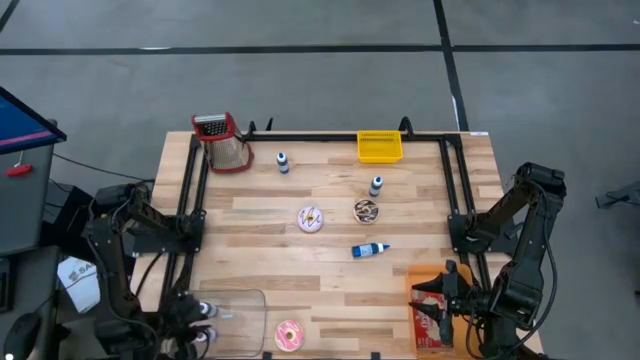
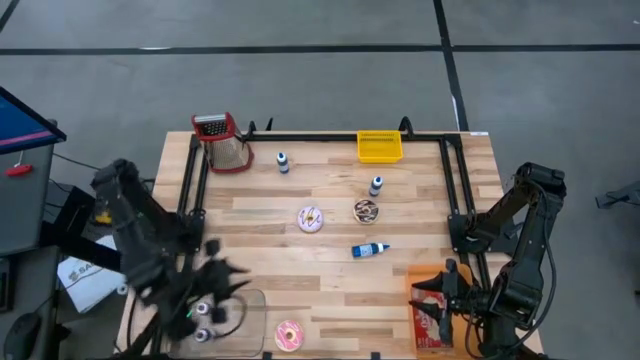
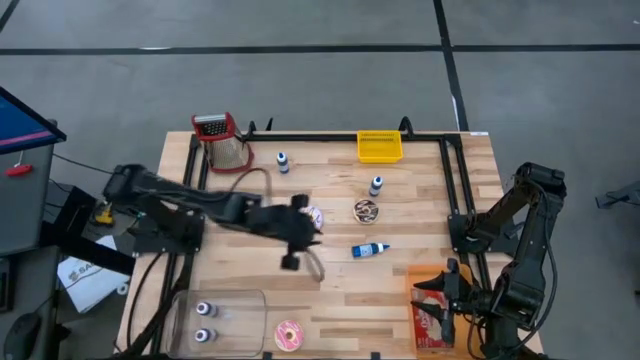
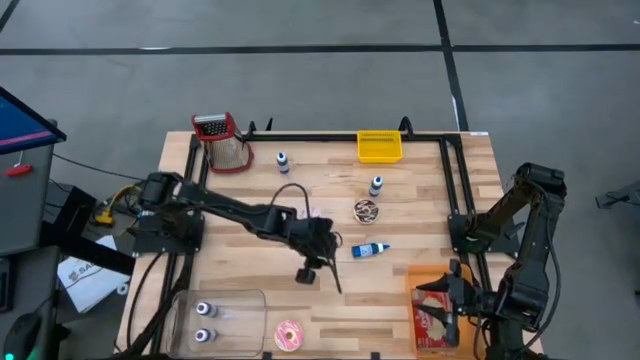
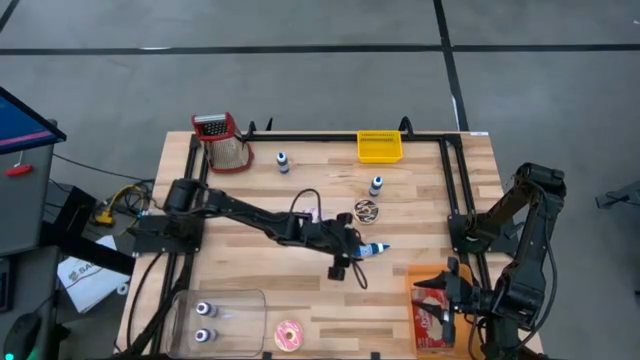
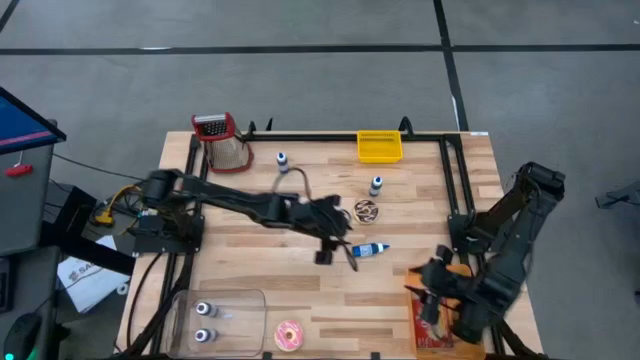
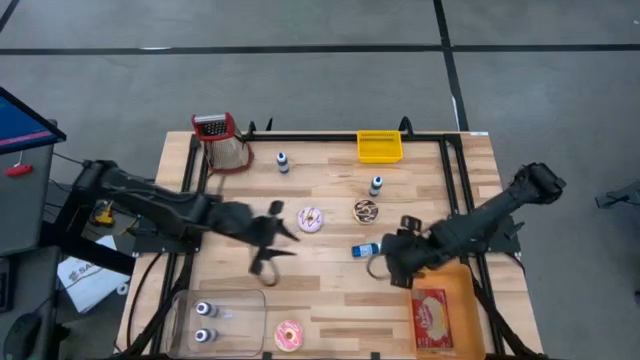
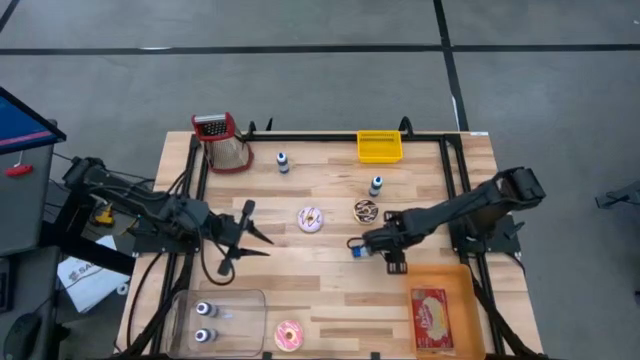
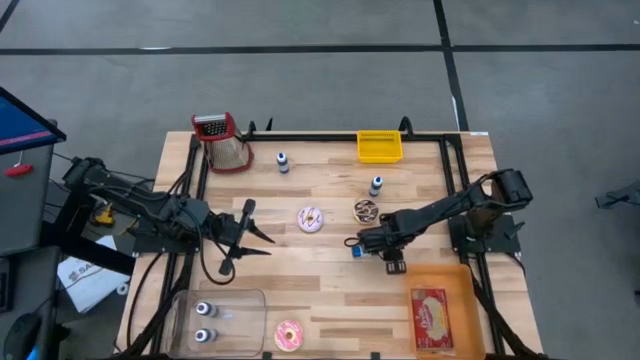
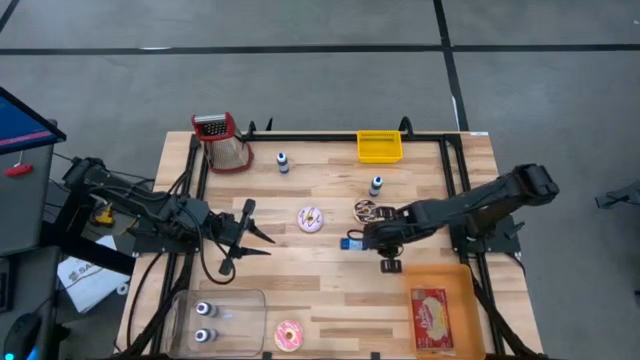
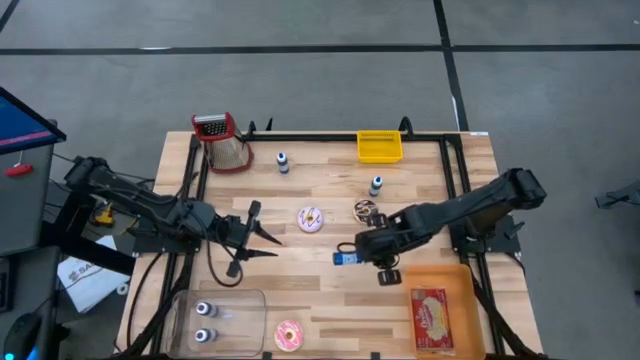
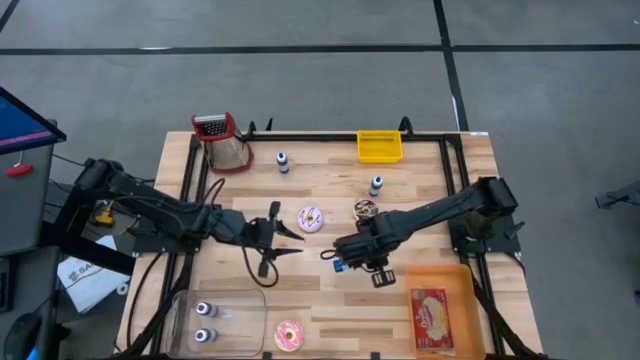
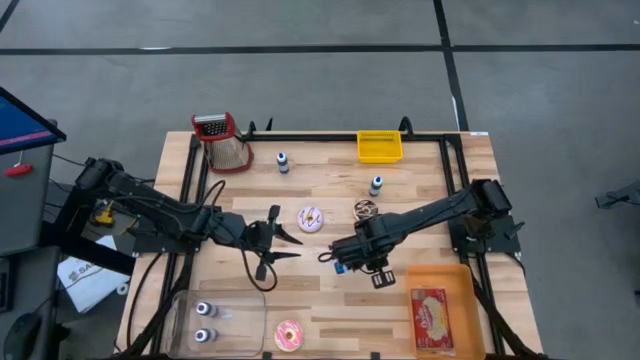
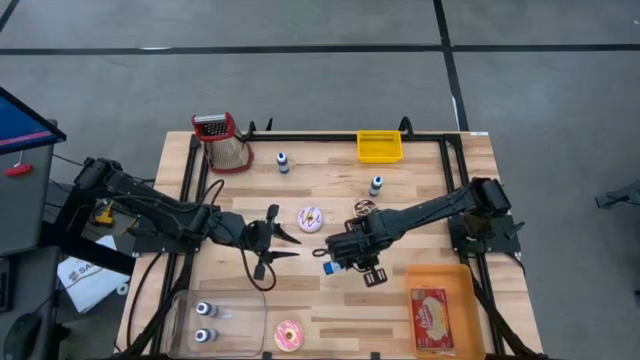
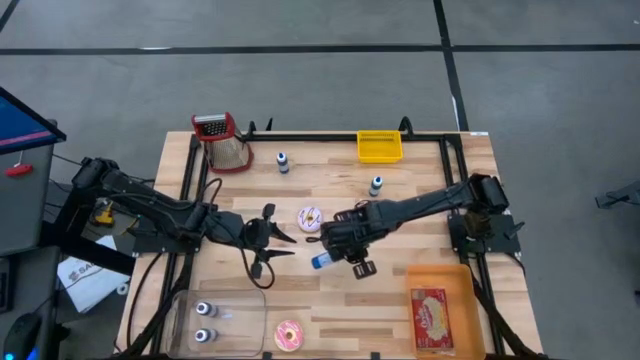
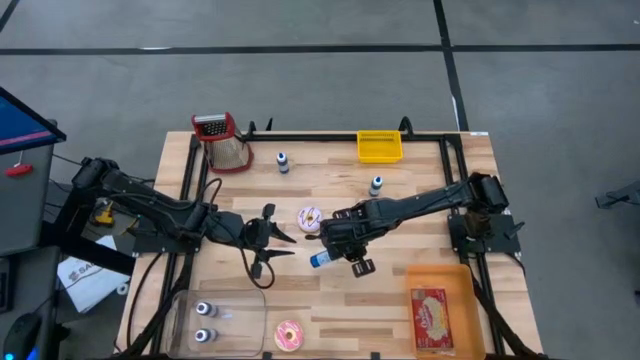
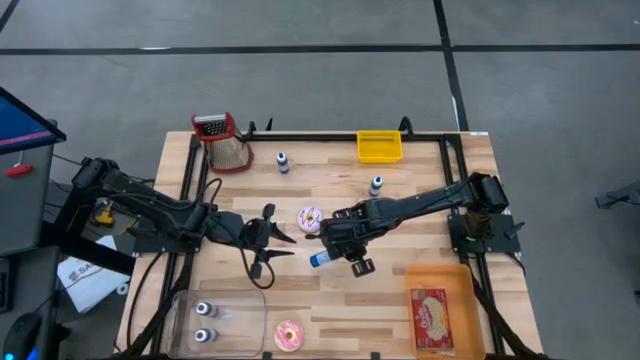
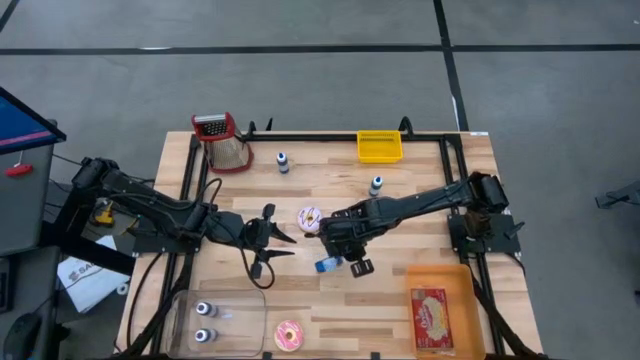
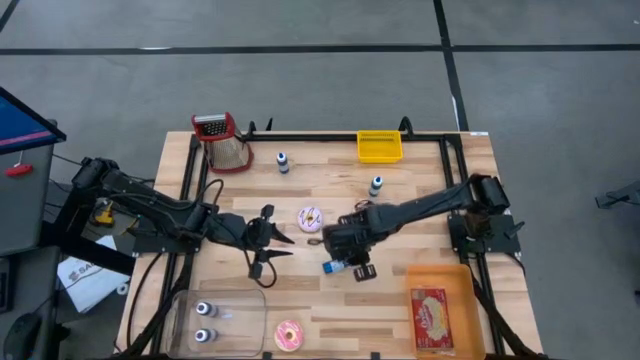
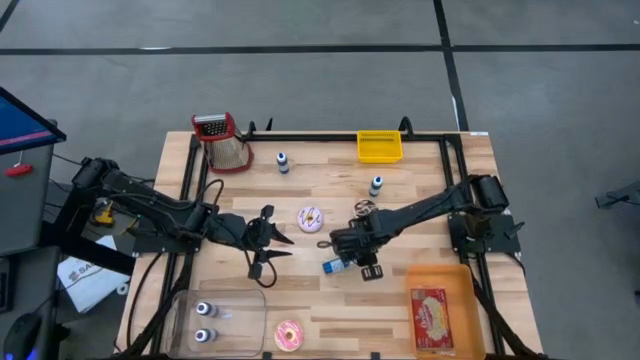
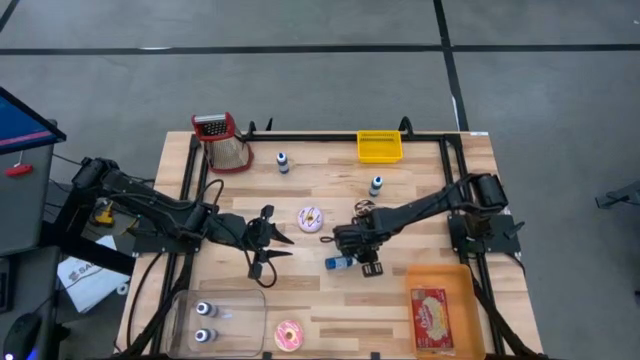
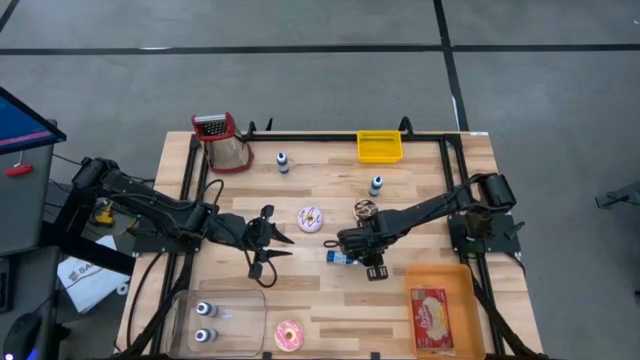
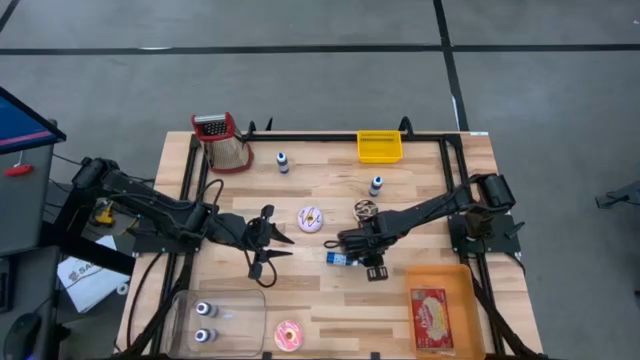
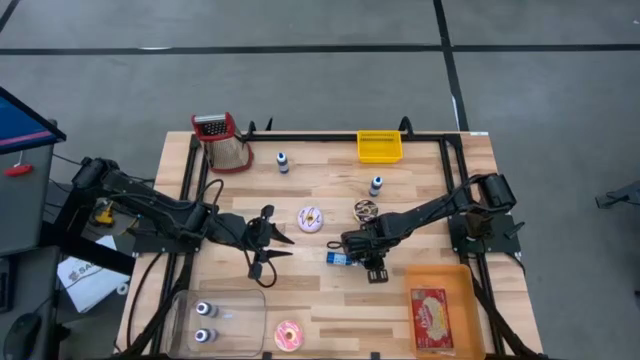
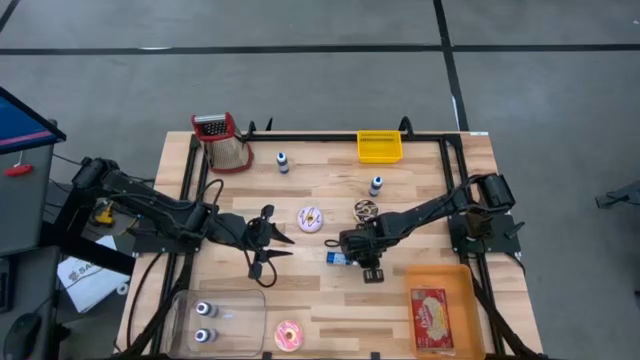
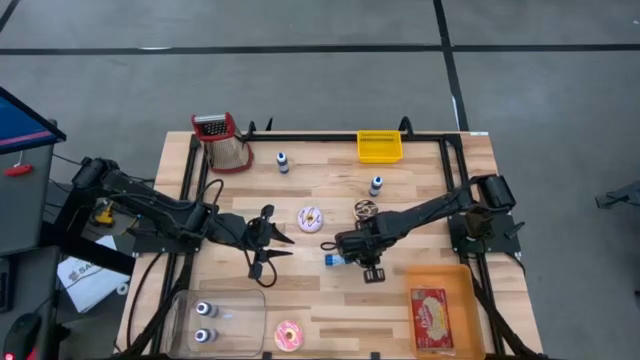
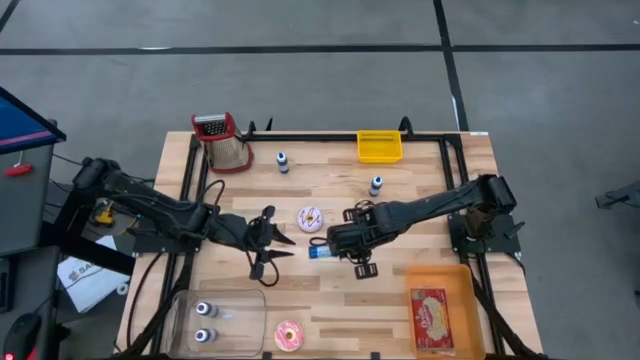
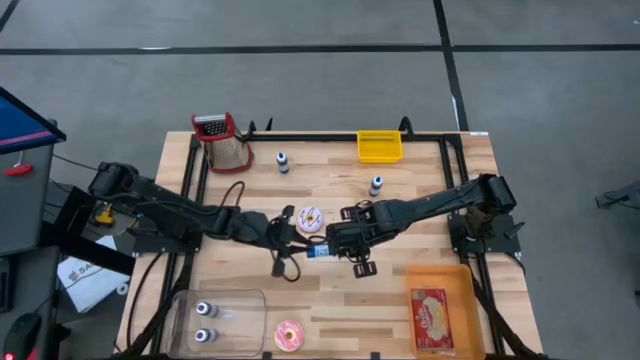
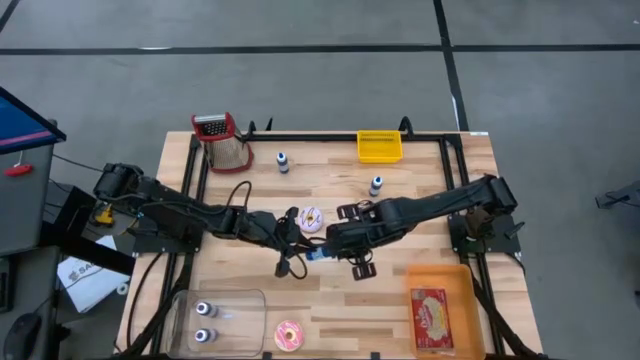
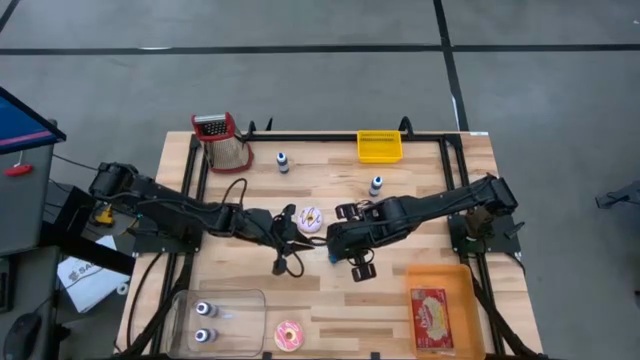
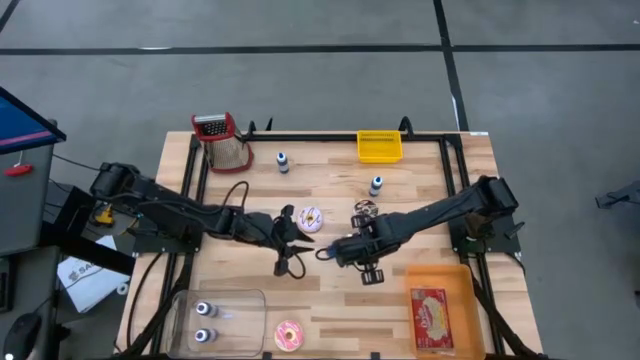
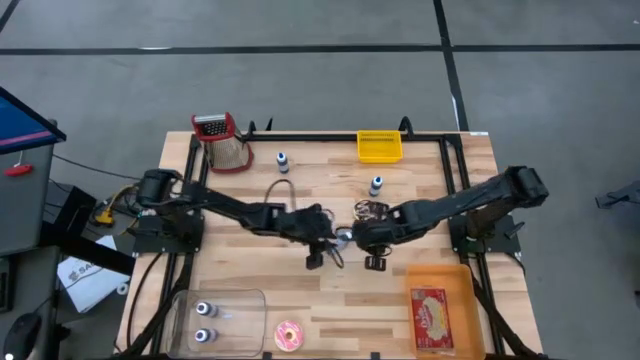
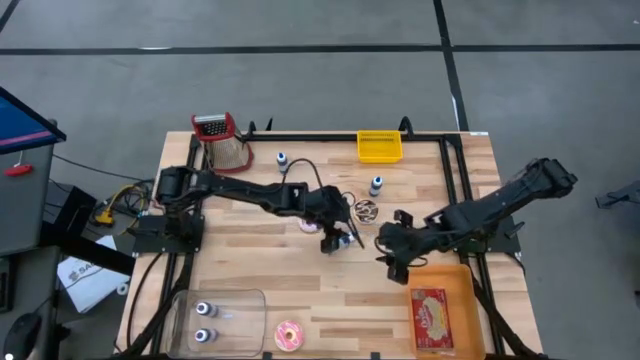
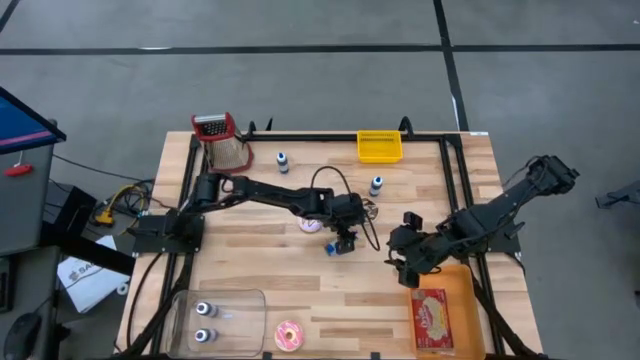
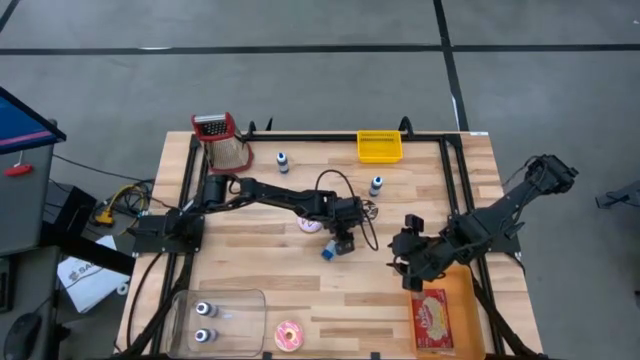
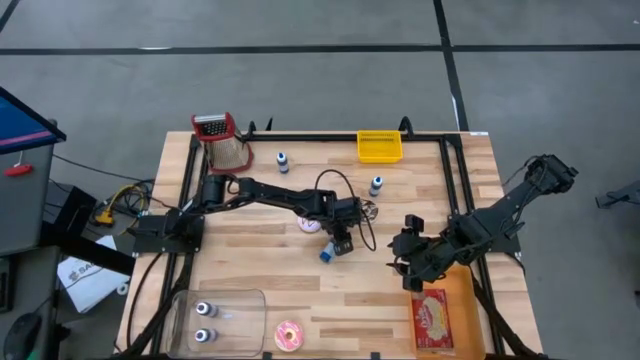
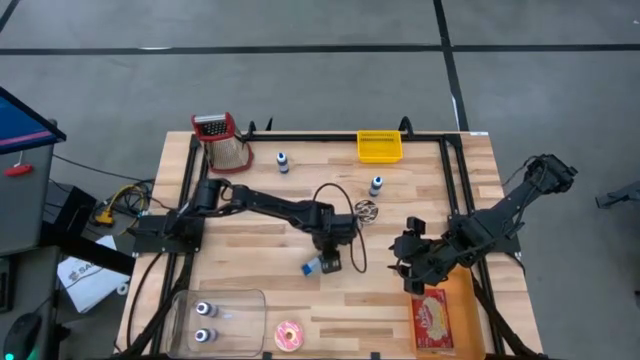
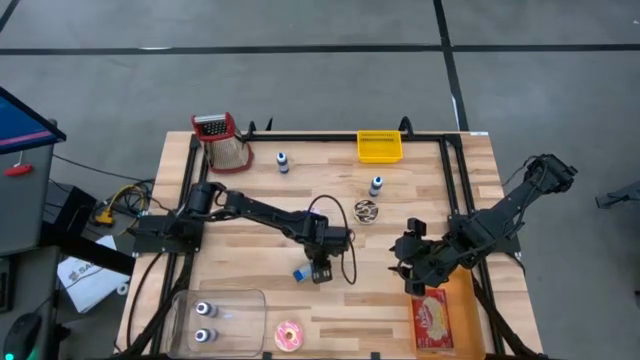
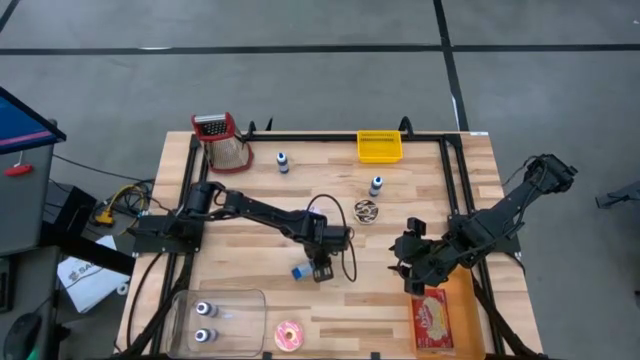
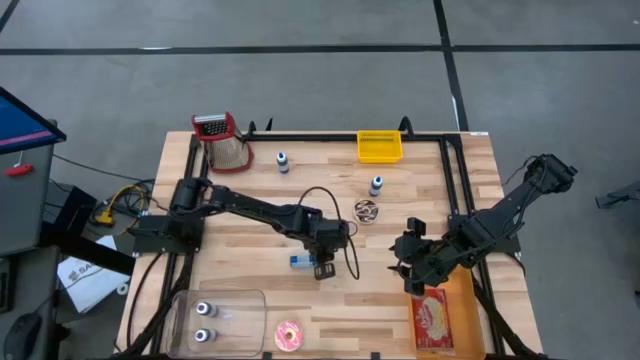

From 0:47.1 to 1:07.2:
Put the bottom blue food coloring bottle into the transparent bin
